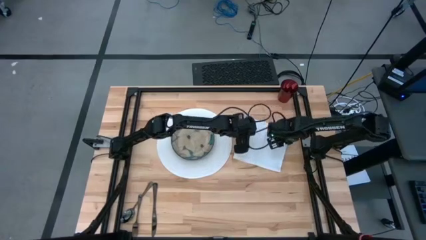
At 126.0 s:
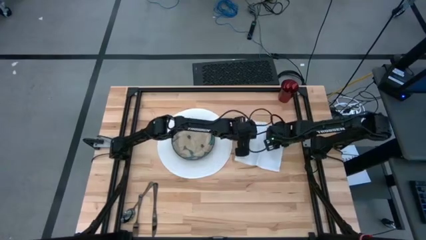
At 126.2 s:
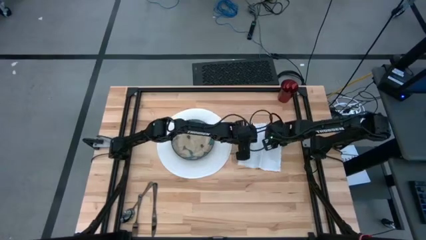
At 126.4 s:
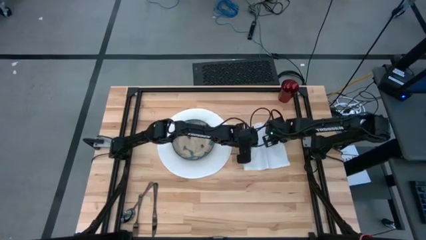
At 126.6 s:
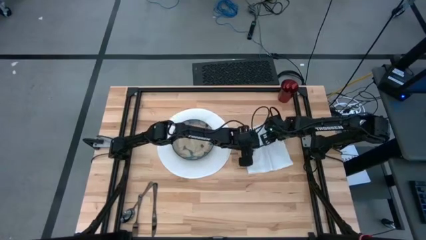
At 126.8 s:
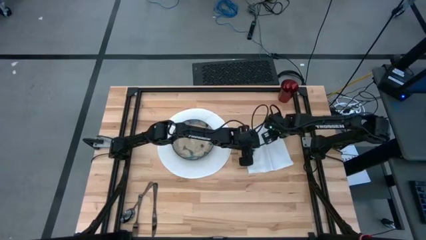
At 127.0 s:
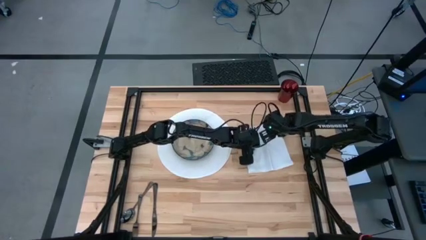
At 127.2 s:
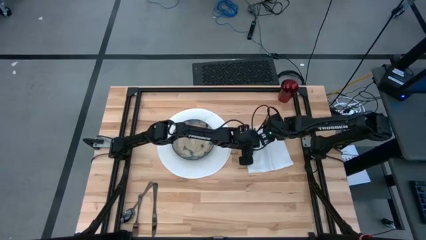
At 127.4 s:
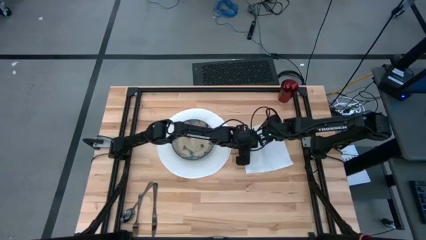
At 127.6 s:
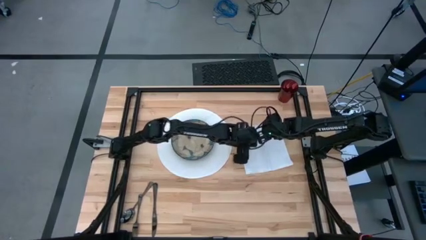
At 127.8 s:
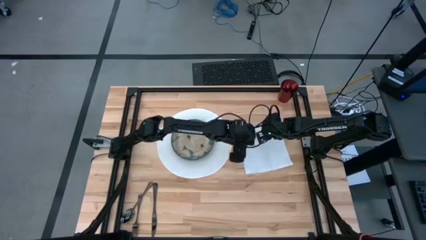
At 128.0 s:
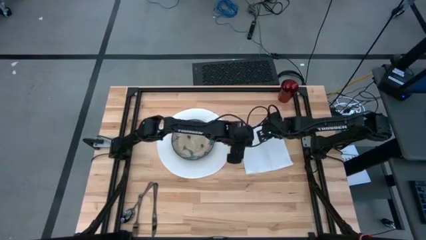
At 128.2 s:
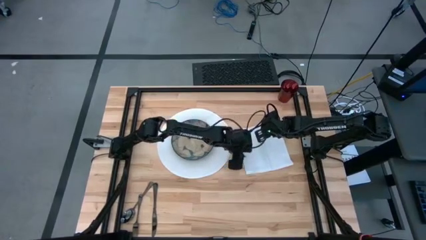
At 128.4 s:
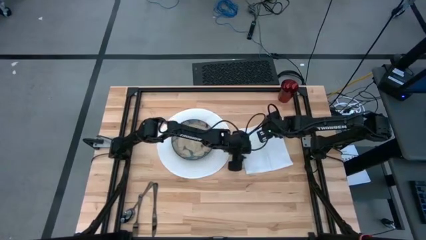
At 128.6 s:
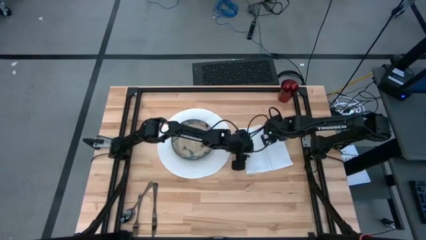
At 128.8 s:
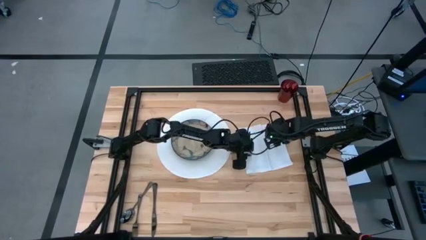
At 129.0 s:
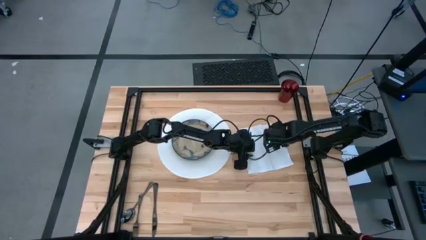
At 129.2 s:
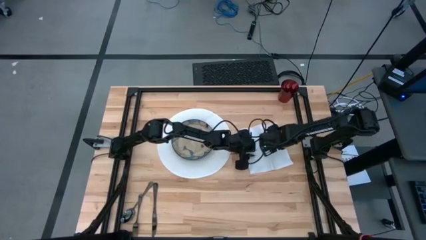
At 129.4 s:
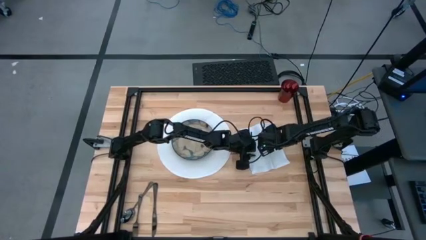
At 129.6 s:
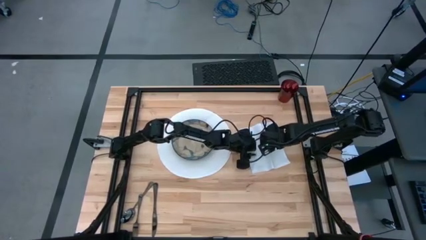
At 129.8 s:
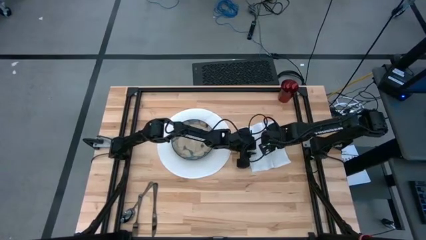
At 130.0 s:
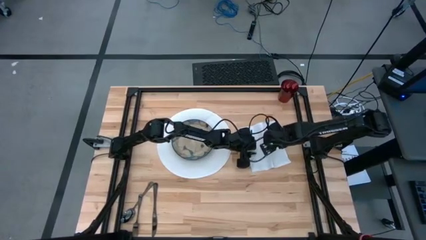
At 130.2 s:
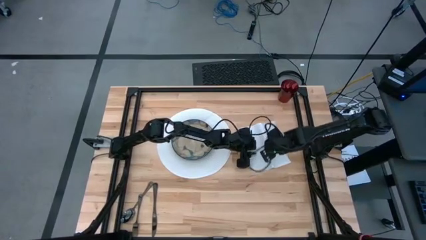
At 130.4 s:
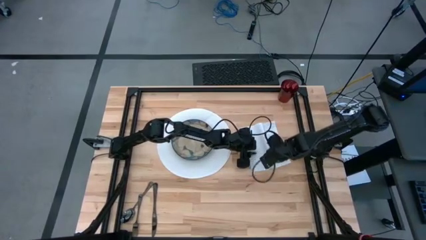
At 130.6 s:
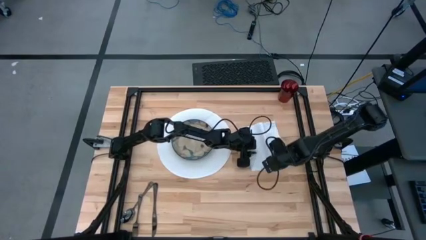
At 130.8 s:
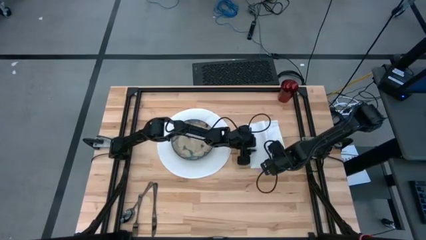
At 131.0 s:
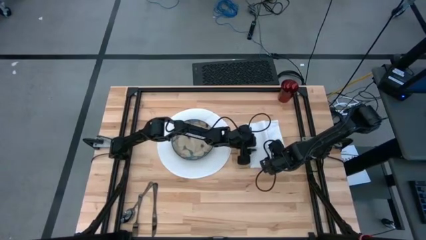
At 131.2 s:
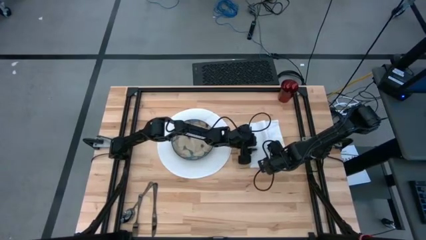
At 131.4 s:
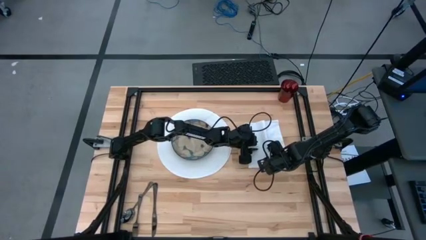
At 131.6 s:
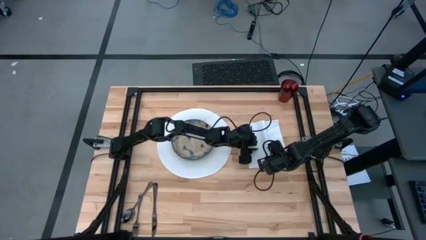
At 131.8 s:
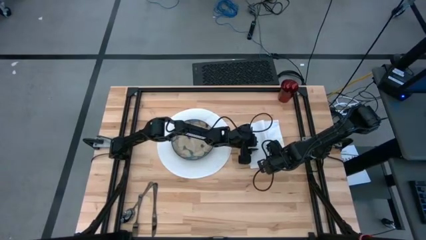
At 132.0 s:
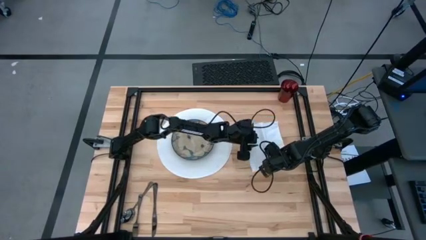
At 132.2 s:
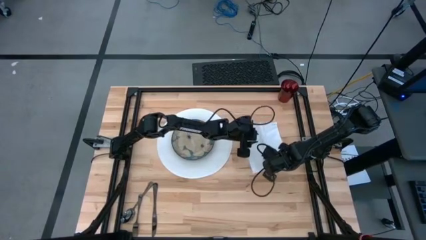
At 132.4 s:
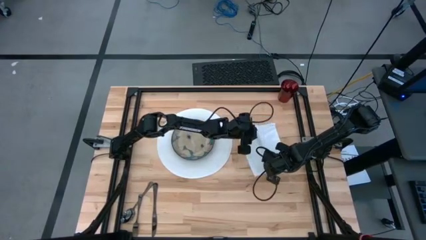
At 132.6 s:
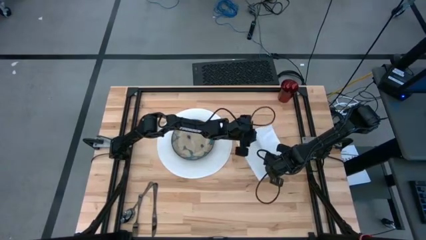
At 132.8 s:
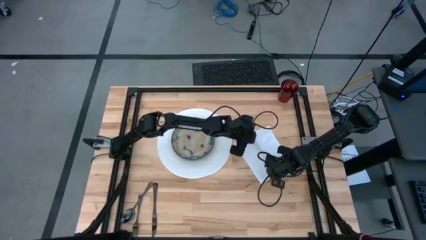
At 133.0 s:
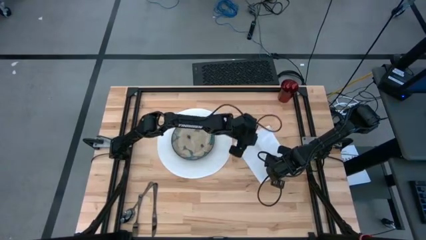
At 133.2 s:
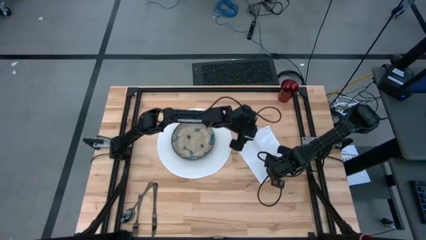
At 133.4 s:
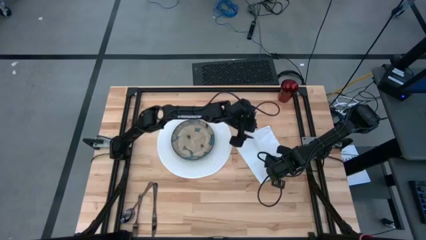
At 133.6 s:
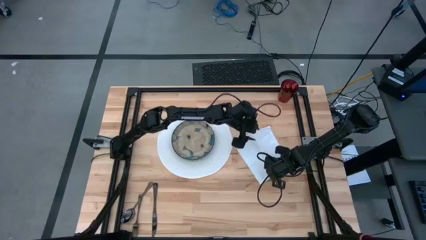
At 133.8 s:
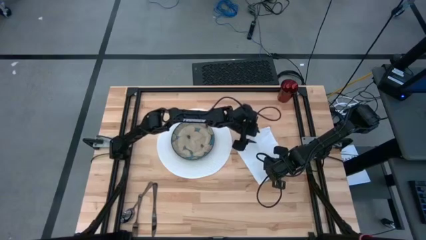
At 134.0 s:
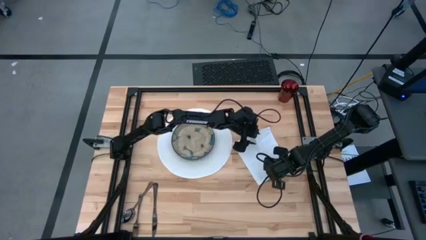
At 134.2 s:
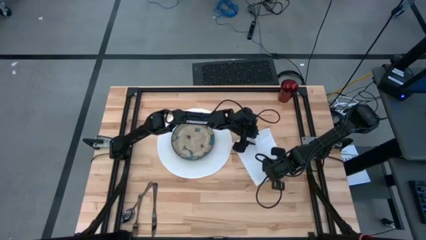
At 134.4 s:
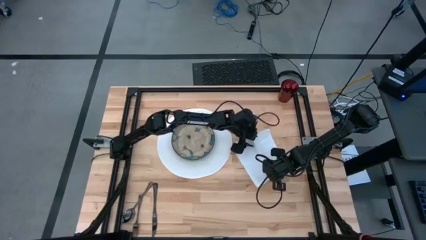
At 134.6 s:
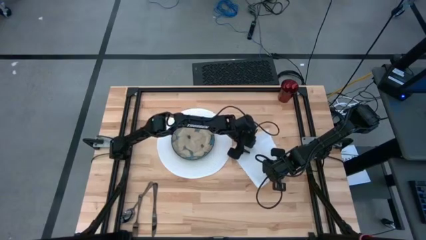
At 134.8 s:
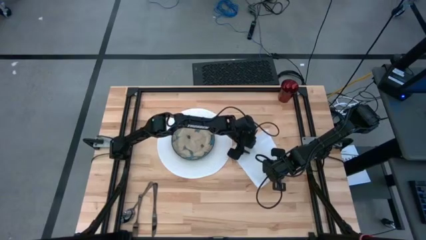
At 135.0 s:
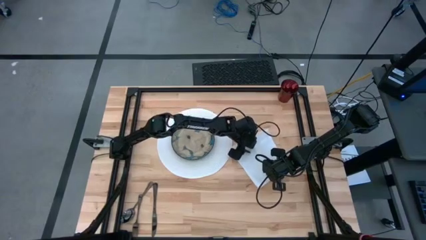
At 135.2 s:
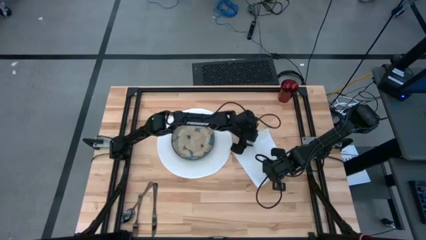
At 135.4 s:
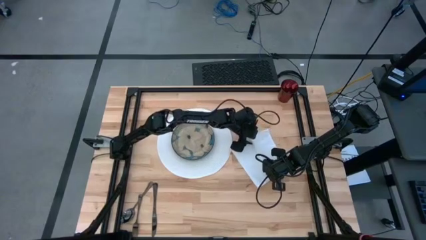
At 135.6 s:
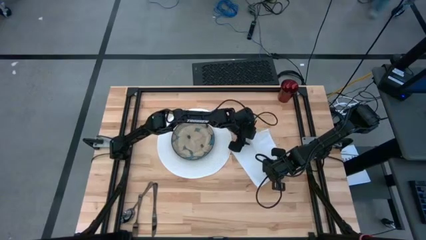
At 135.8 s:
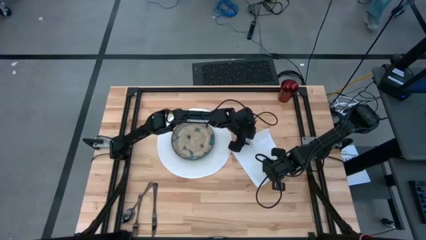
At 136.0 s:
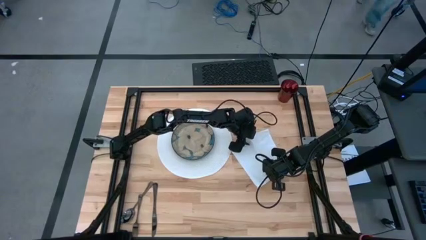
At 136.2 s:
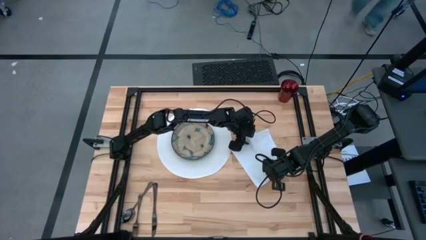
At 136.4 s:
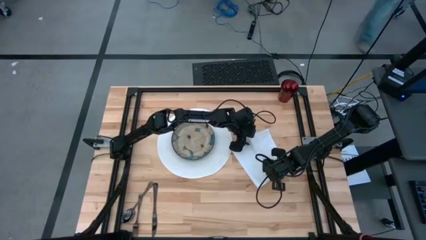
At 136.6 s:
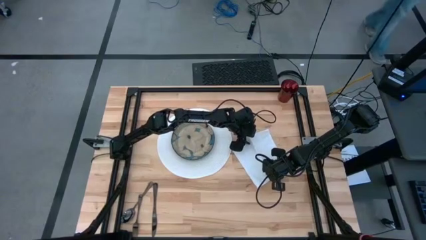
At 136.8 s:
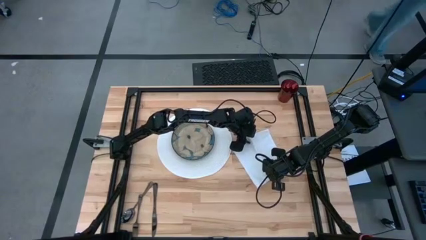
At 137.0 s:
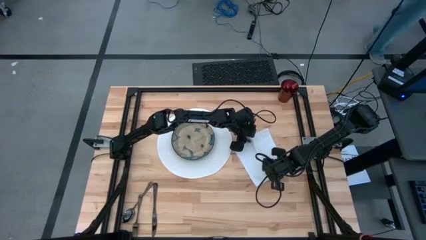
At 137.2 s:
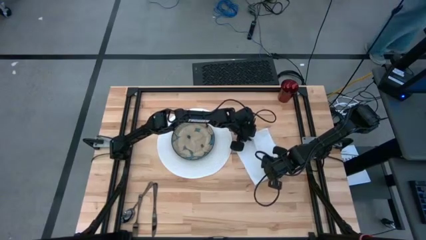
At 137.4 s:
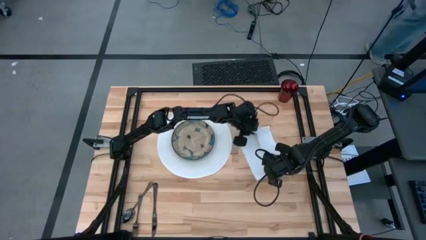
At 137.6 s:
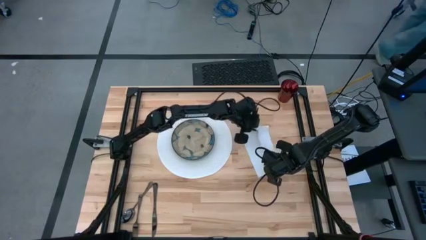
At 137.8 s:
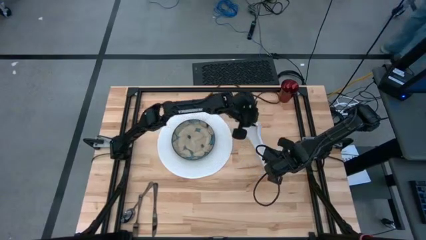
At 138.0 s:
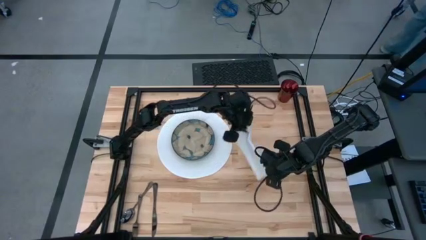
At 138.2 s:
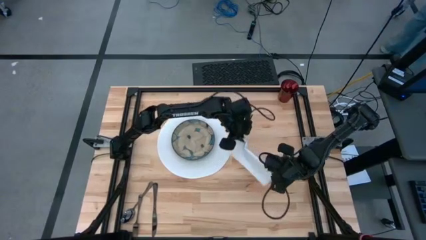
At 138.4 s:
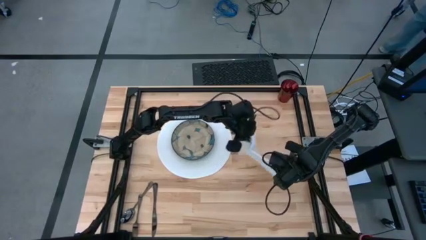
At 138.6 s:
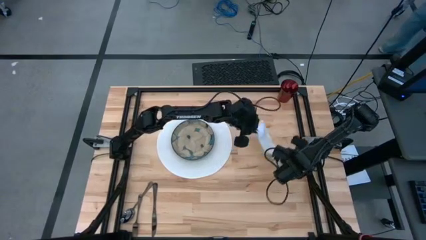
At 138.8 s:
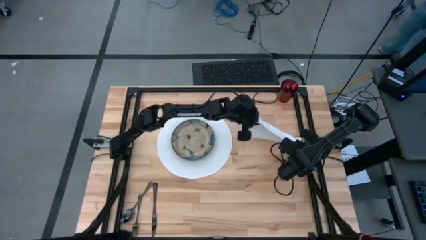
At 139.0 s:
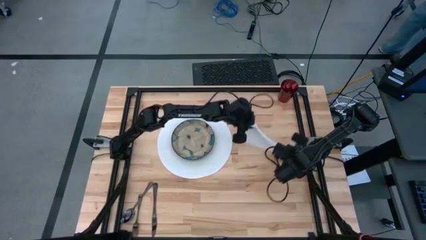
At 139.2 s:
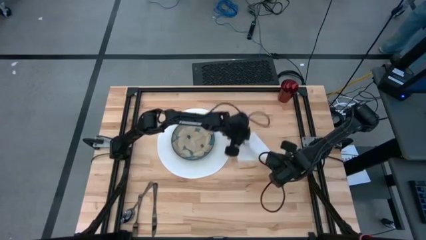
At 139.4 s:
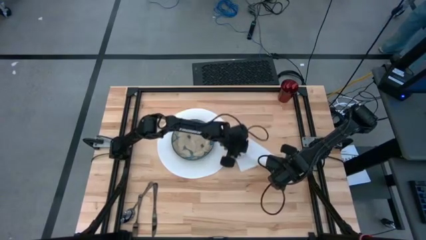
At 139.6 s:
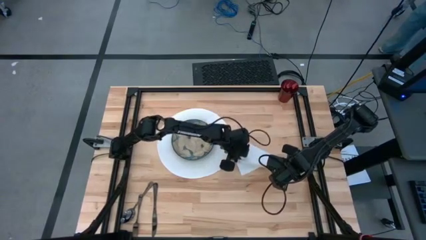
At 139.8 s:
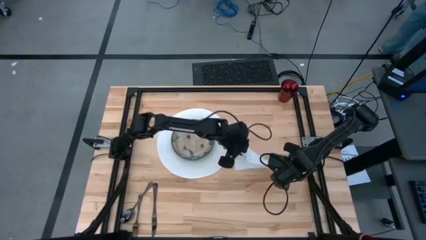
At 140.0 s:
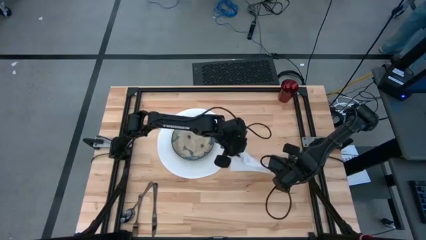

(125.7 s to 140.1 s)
Task: Set table place
Fold the white napkin

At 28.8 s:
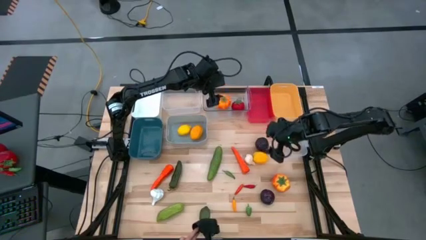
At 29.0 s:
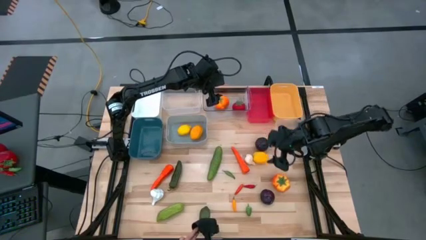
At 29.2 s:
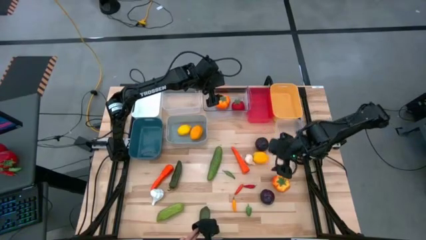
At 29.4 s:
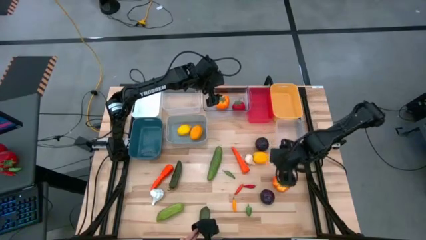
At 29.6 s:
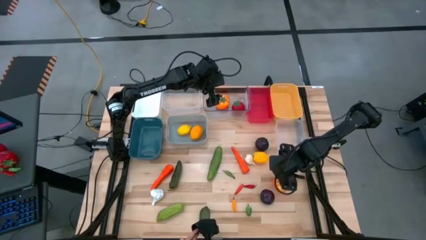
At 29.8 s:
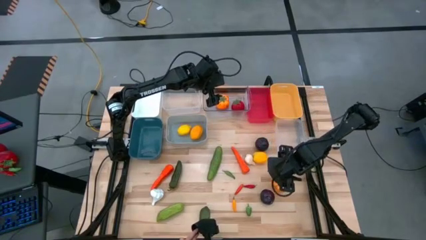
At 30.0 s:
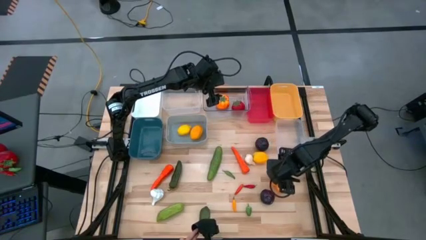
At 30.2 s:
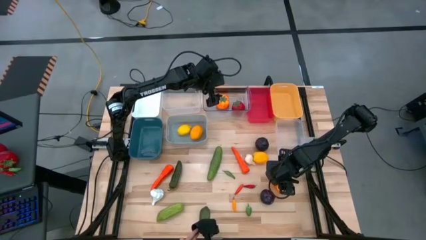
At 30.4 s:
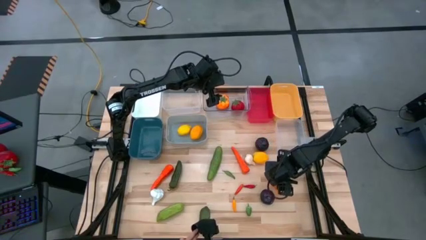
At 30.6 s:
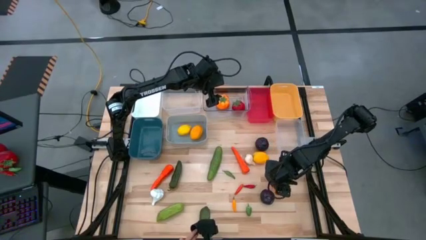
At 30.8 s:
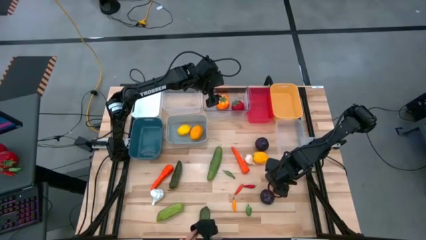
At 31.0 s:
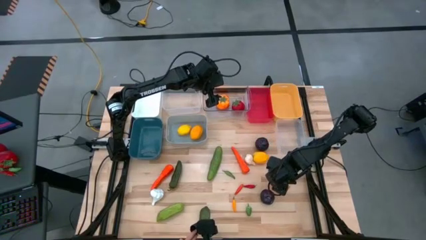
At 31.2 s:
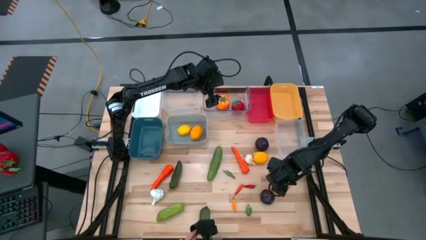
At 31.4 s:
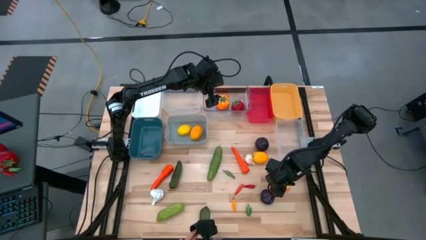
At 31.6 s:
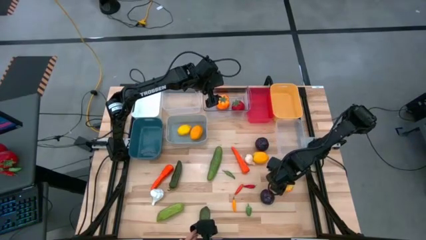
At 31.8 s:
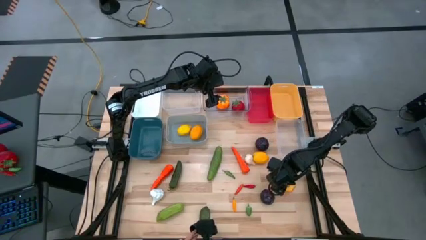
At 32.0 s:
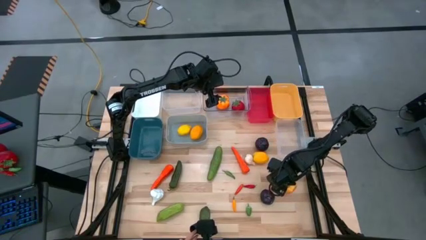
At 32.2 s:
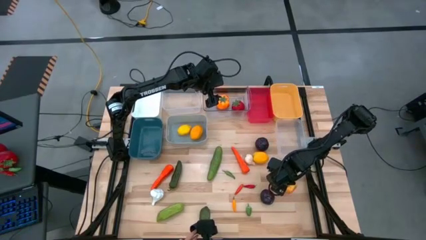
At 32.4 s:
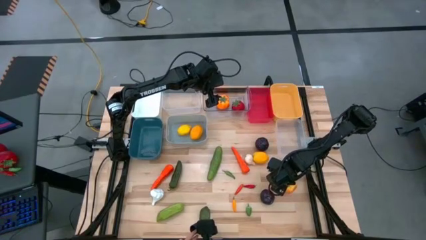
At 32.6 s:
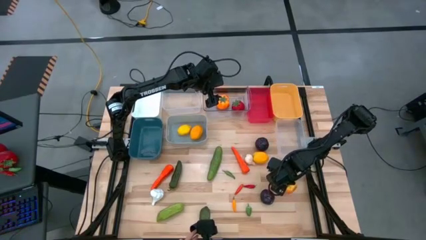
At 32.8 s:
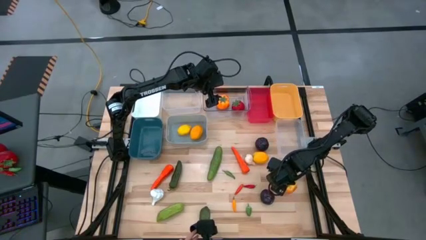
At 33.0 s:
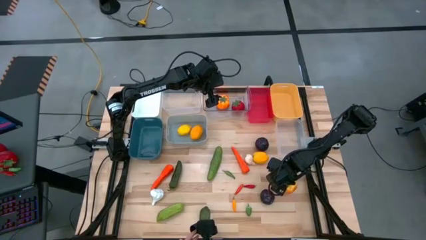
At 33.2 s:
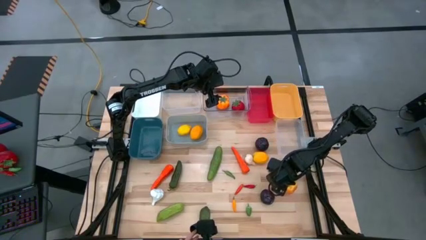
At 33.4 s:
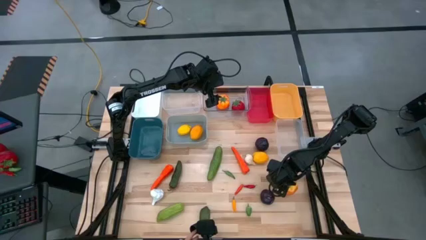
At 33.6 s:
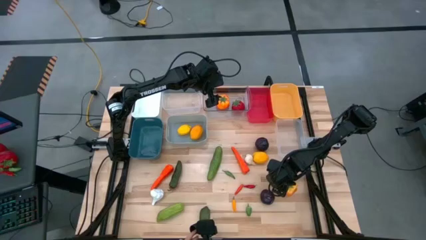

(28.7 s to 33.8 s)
Task: Sort produce into baskets
Put the orange tomato into the top right transparent bin
